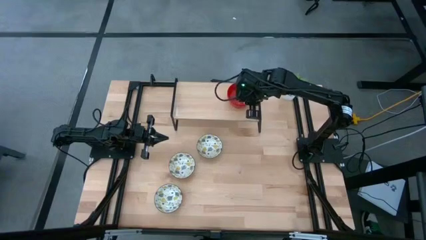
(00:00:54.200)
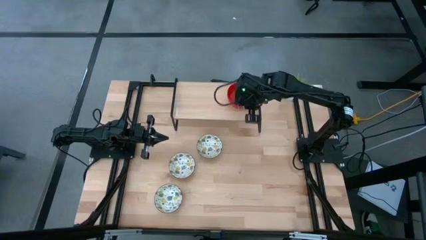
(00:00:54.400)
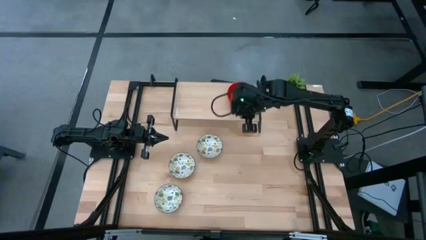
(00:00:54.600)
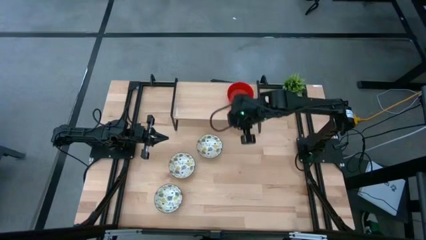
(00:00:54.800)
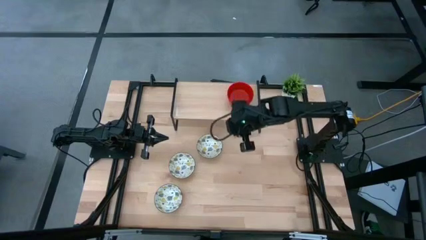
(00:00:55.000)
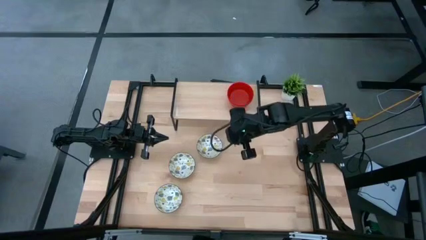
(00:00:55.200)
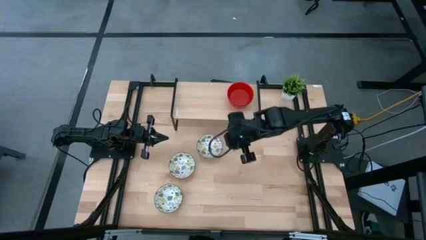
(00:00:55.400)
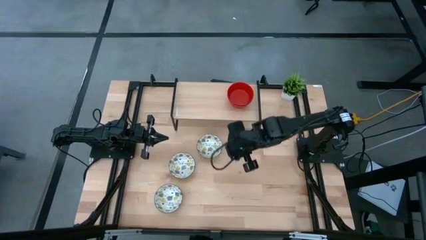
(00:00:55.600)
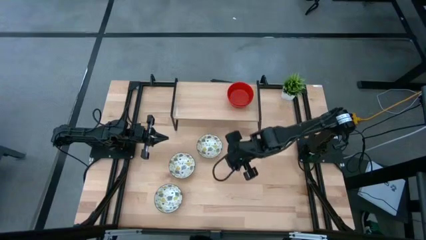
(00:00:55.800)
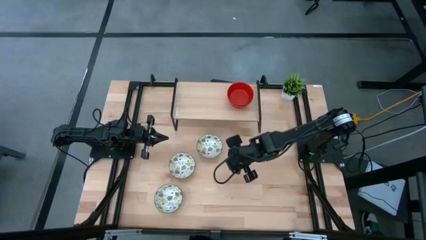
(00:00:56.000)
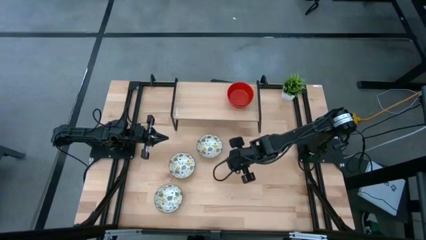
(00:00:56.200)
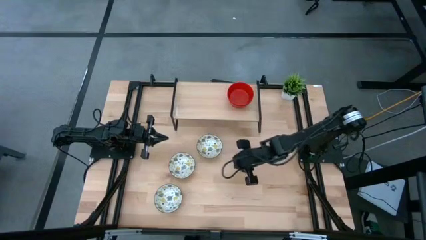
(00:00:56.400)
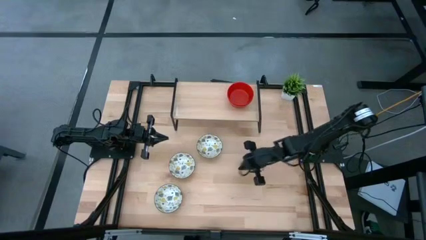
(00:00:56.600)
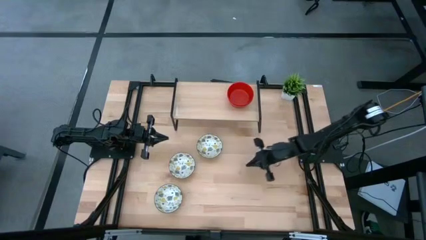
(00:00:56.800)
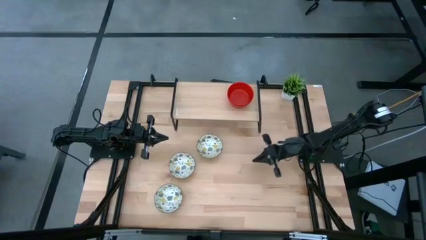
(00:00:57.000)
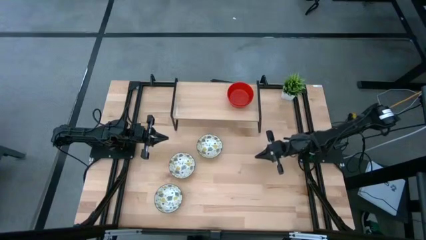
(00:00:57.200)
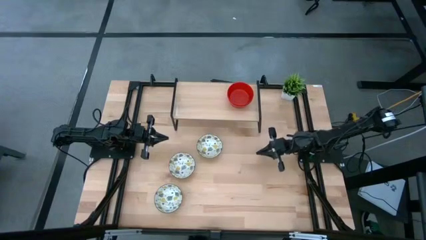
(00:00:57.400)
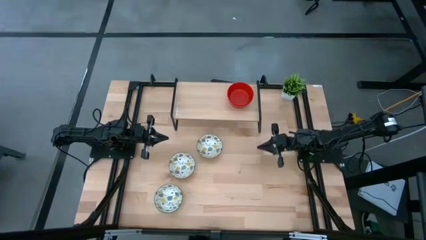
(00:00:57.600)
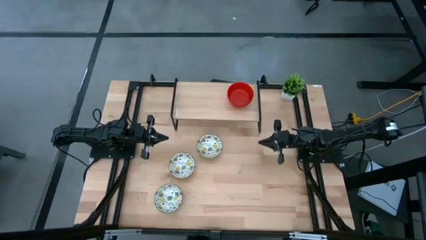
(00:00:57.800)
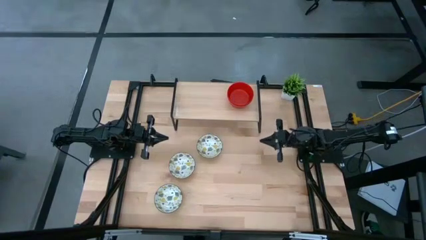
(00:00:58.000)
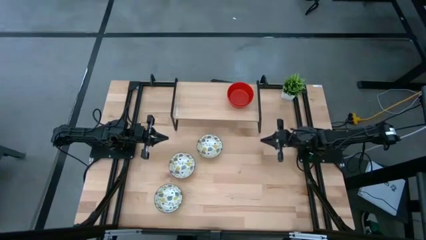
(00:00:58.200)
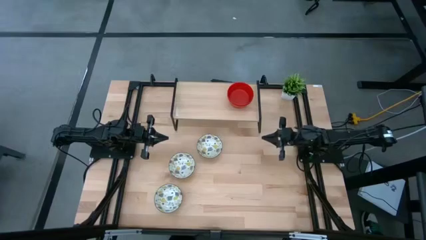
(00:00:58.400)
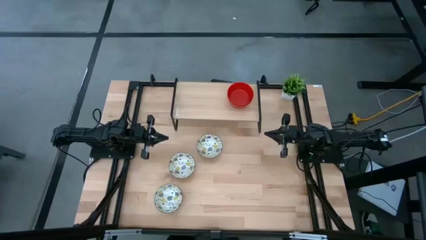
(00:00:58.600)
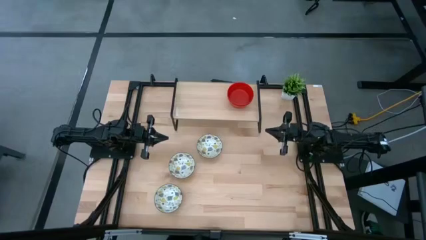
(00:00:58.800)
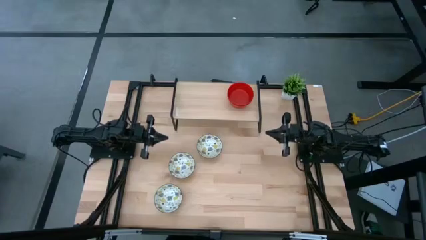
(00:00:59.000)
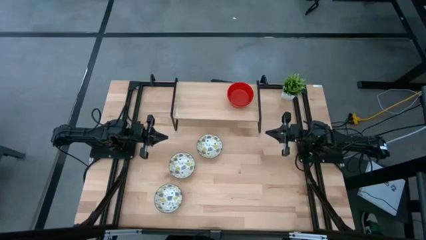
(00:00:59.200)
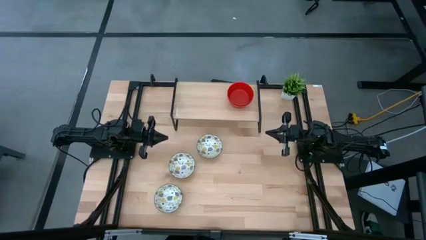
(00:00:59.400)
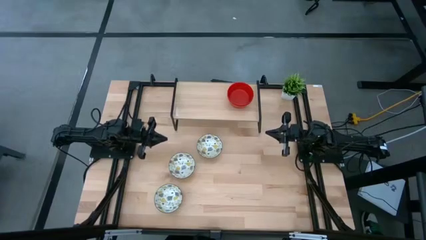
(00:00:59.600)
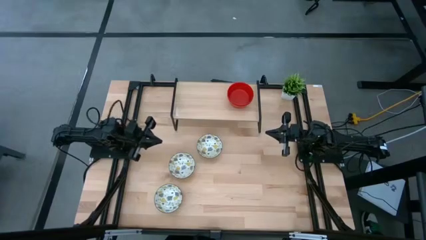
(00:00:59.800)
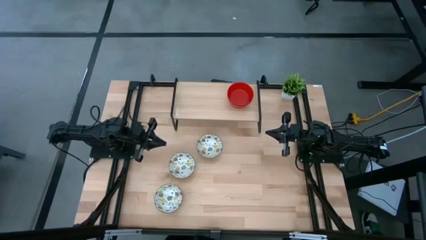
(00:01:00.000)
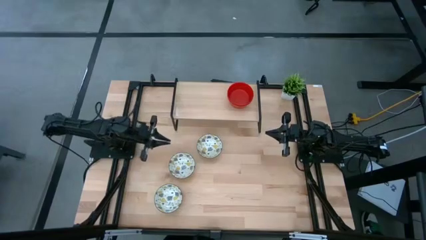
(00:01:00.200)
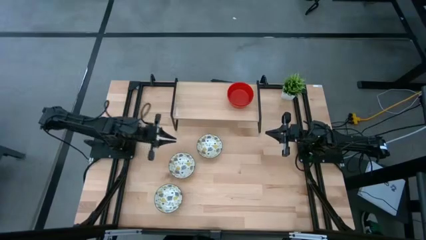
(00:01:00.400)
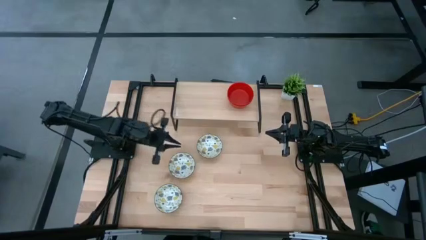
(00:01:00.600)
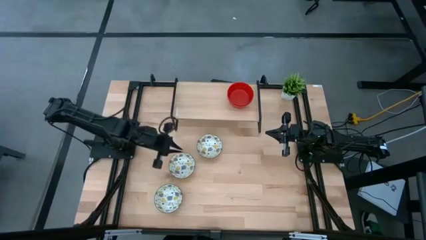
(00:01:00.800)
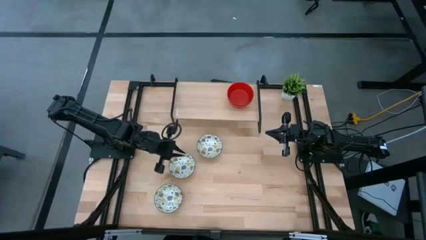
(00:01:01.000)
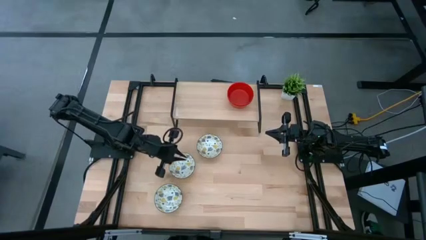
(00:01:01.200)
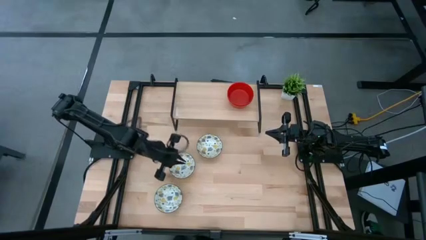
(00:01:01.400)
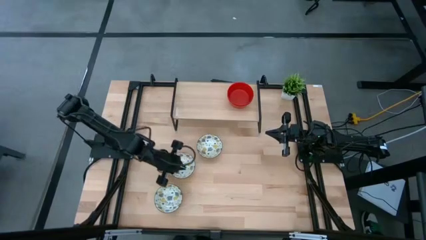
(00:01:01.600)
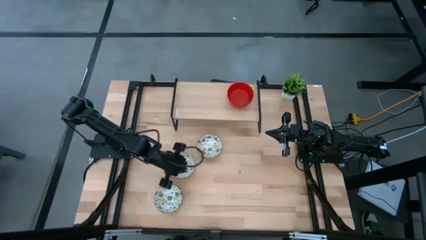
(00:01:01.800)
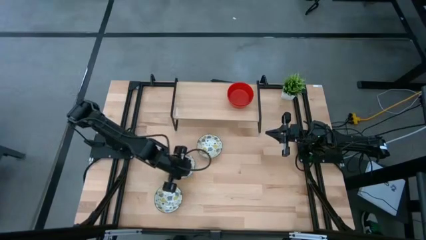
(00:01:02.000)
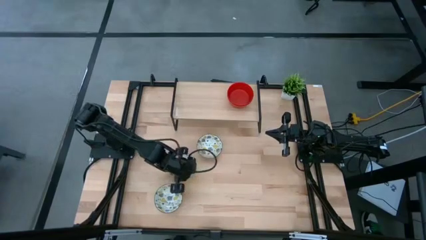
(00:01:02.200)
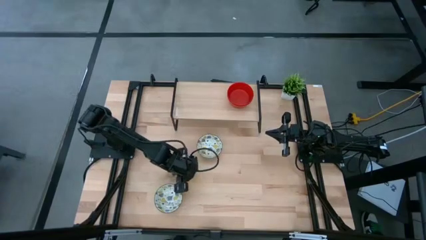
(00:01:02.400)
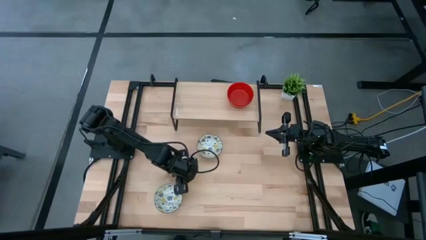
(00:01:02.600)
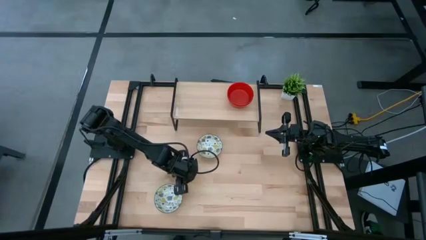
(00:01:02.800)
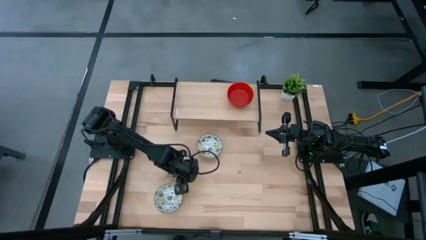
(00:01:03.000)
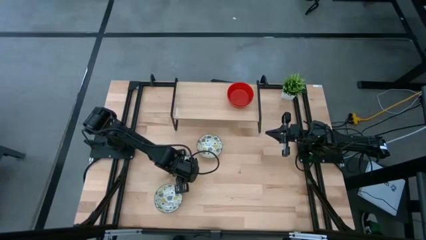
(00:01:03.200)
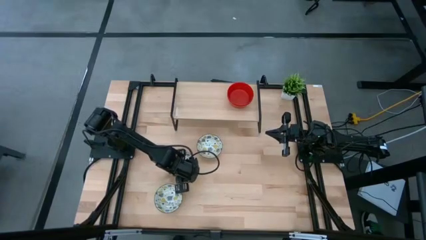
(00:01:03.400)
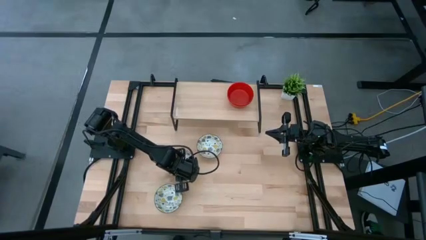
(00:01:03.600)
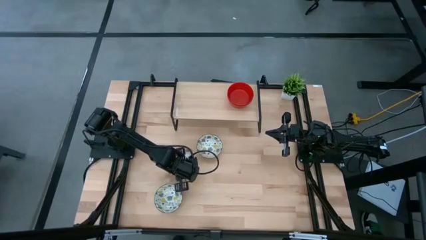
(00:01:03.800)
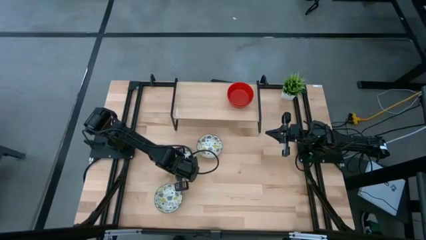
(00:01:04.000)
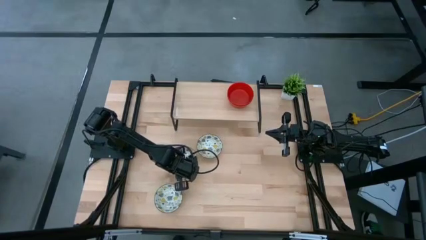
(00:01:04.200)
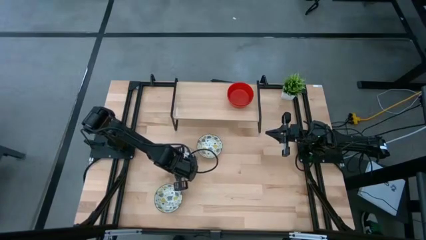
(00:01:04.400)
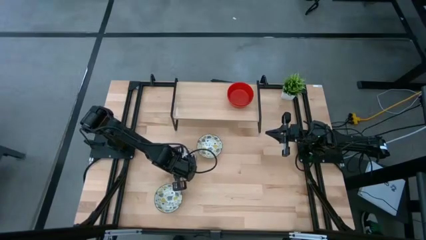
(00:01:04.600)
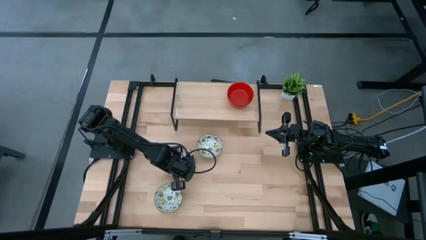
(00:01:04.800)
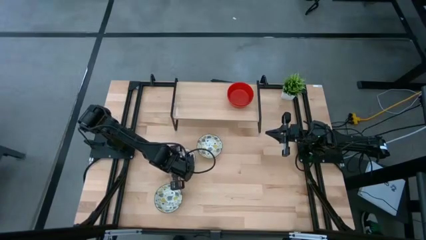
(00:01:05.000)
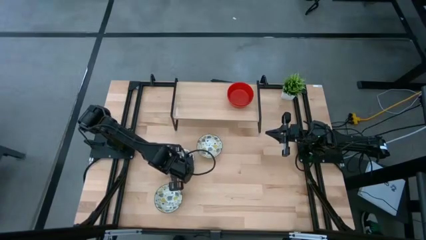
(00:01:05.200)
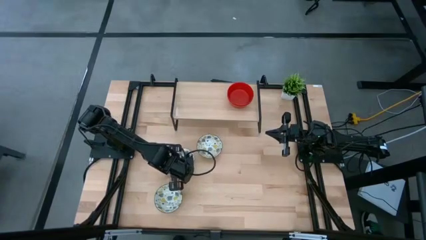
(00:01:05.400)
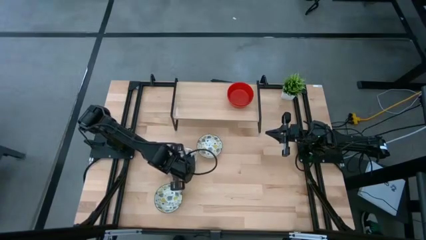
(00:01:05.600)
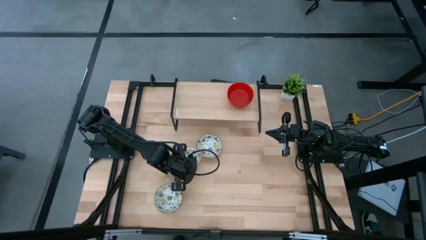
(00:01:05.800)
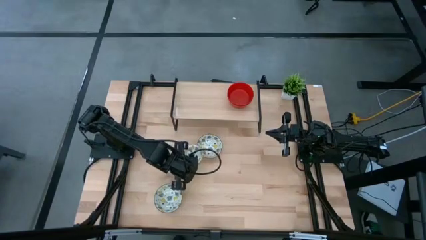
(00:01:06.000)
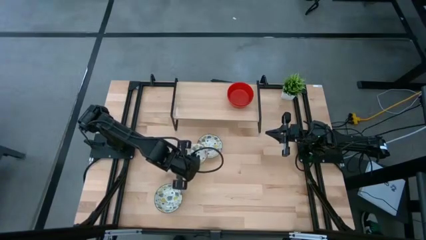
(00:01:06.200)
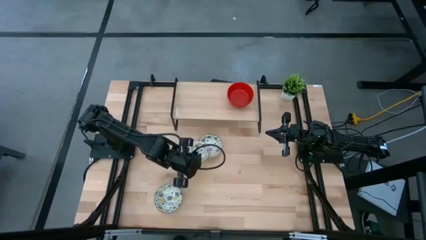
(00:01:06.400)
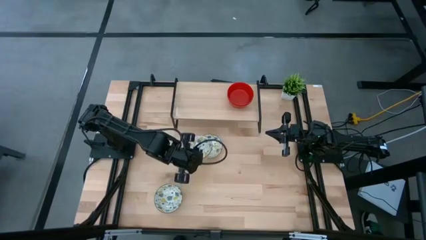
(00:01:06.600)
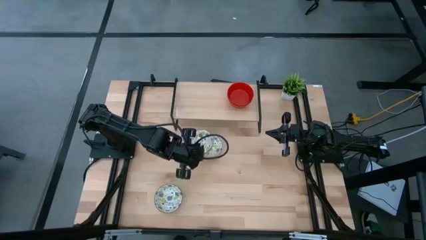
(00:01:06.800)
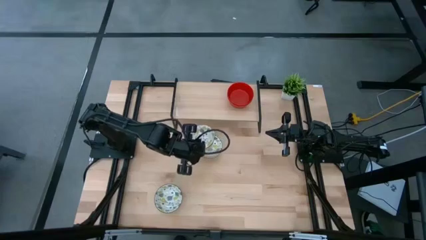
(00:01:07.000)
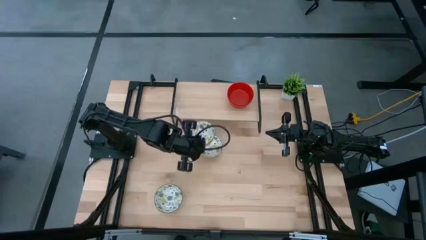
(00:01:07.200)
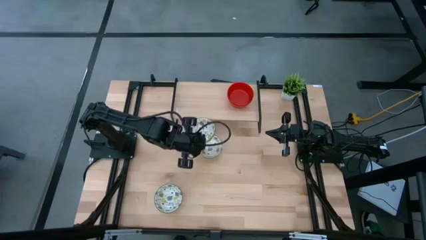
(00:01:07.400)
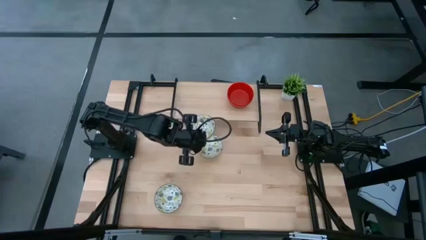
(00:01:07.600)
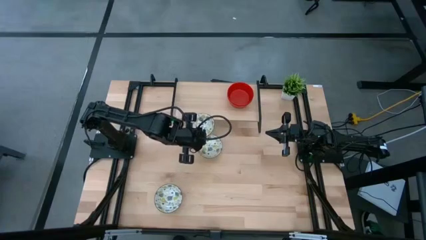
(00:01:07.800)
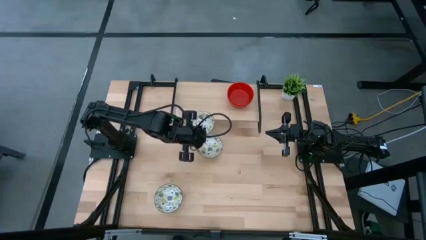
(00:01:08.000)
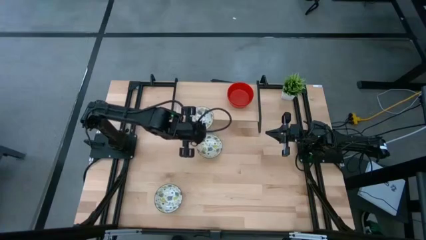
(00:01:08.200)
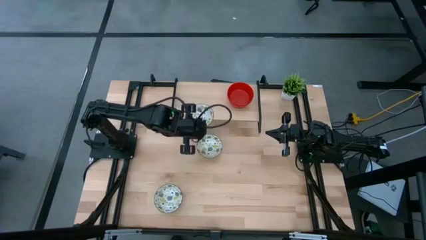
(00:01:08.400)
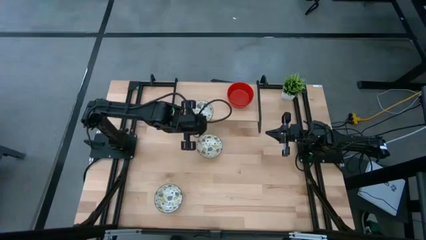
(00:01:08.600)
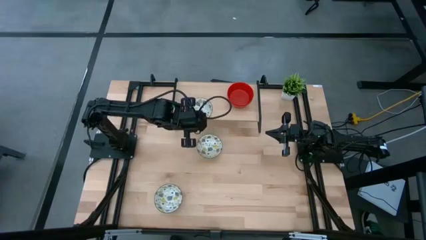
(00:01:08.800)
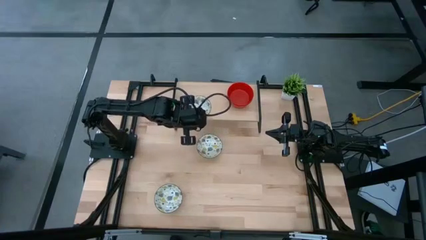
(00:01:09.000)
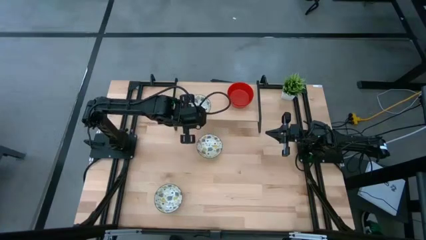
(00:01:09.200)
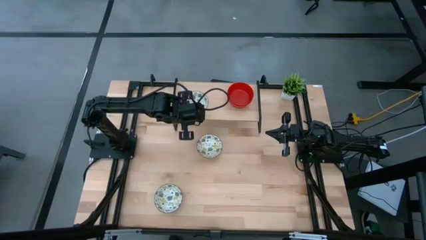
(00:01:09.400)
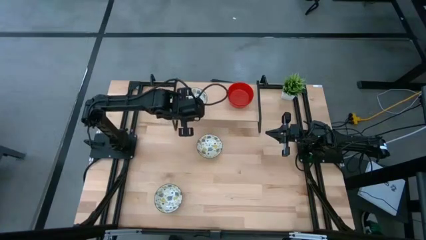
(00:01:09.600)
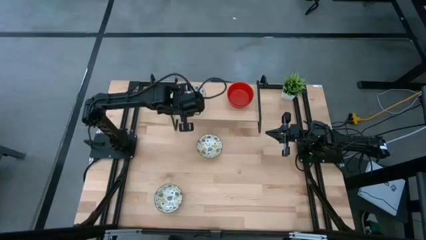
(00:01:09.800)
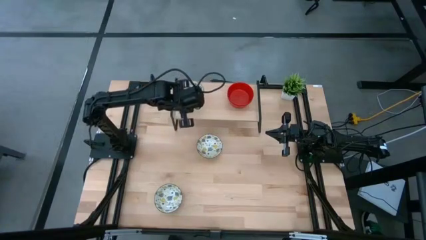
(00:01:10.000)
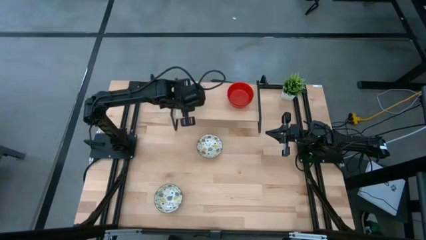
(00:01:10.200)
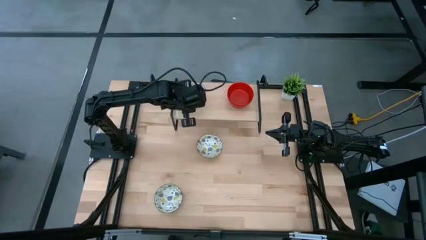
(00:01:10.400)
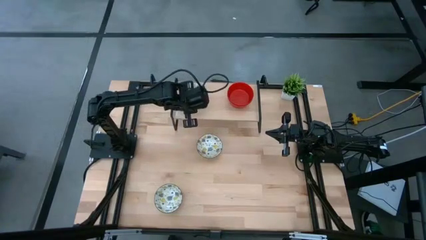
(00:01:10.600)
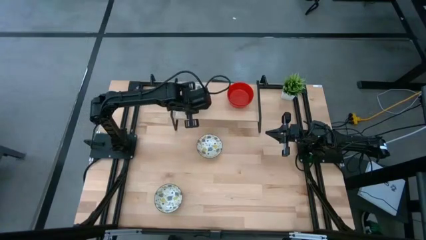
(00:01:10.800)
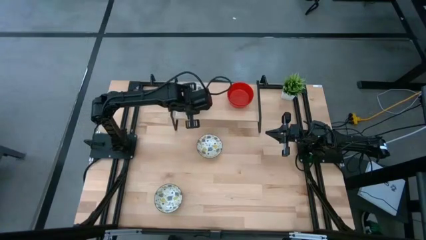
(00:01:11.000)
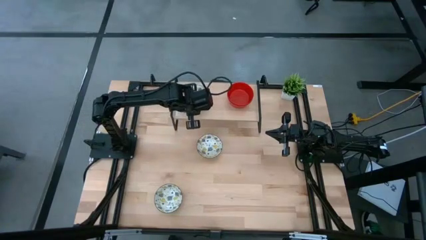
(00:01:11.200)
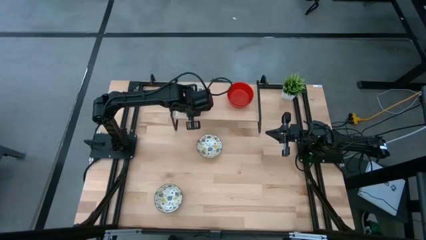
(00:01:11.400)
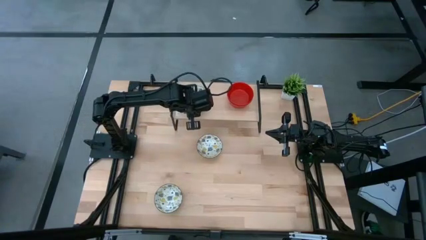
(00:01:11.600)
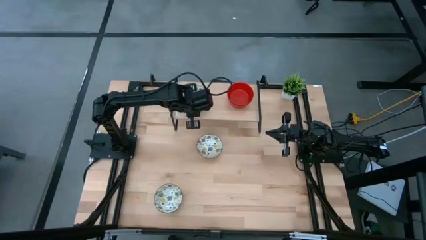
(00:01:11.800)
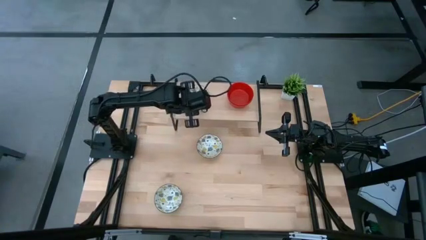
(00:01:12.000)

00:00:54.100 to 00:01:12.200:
Task: Pick & Place Mini bowls
Put the middle white patterned bowl on the shelf
